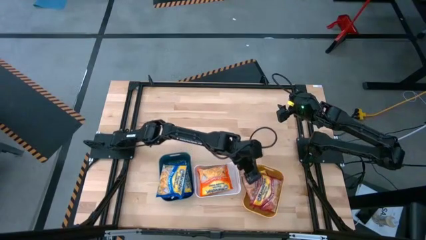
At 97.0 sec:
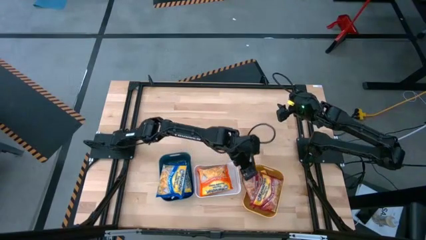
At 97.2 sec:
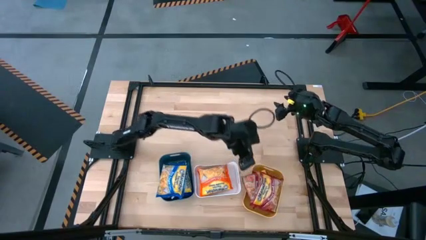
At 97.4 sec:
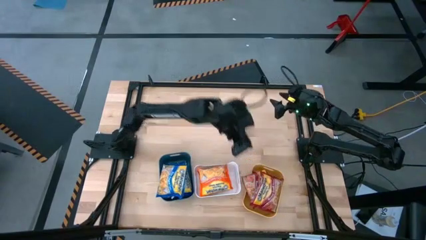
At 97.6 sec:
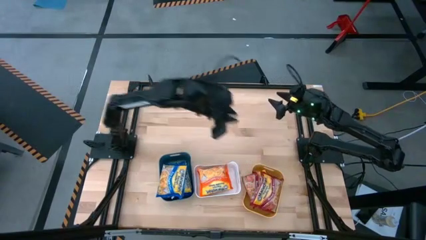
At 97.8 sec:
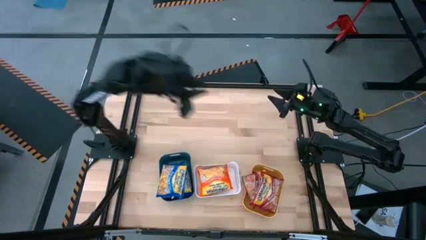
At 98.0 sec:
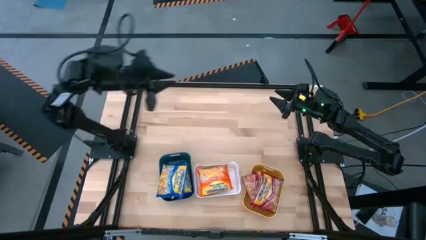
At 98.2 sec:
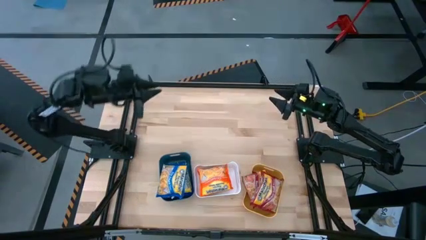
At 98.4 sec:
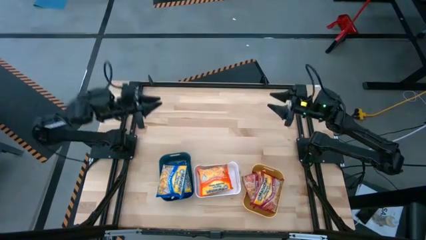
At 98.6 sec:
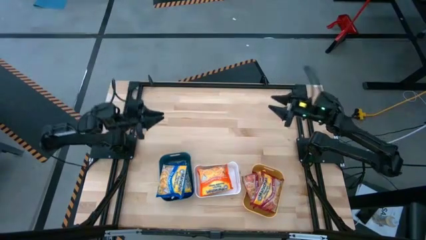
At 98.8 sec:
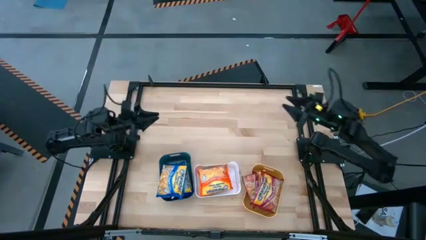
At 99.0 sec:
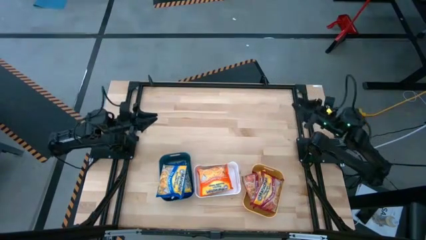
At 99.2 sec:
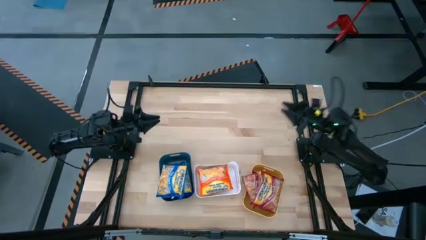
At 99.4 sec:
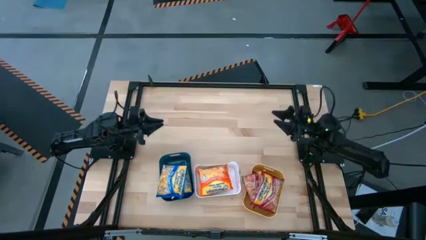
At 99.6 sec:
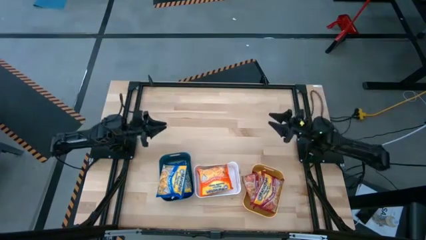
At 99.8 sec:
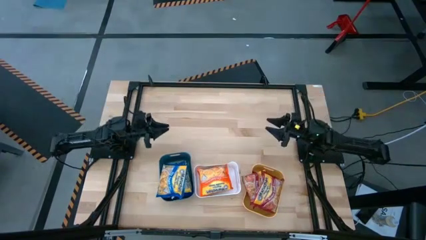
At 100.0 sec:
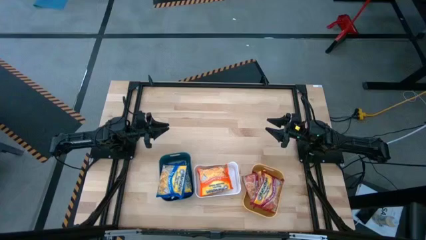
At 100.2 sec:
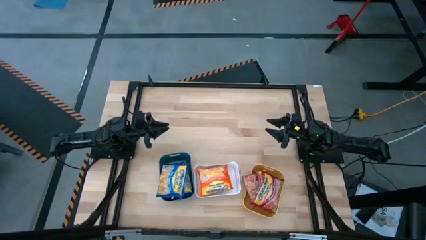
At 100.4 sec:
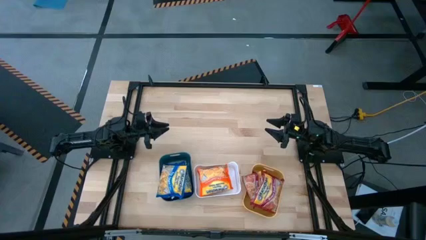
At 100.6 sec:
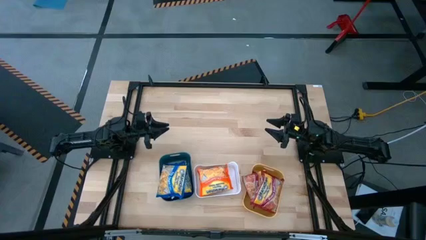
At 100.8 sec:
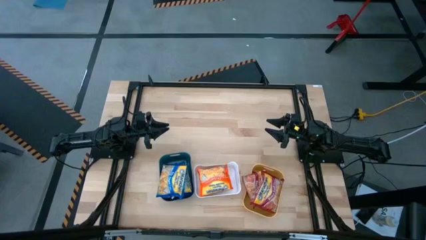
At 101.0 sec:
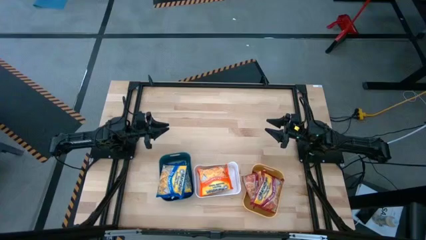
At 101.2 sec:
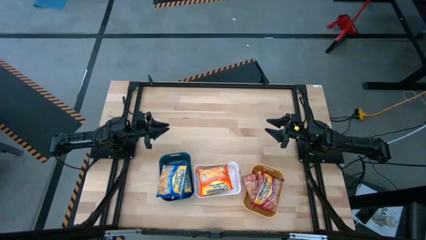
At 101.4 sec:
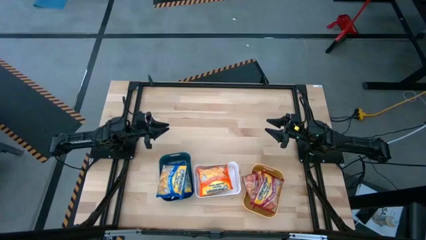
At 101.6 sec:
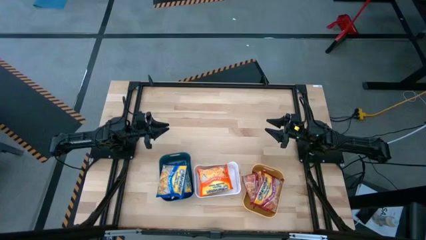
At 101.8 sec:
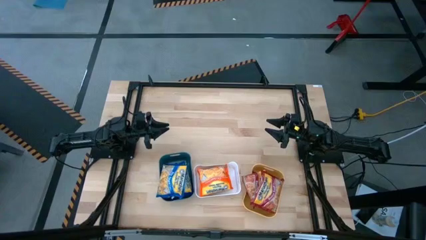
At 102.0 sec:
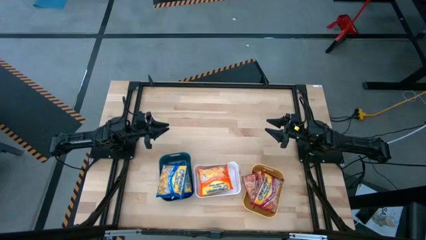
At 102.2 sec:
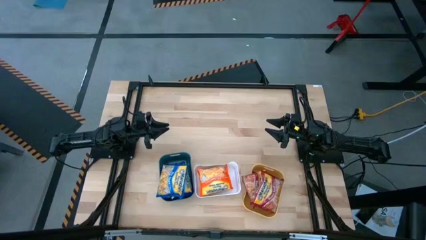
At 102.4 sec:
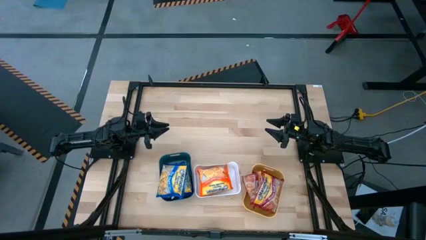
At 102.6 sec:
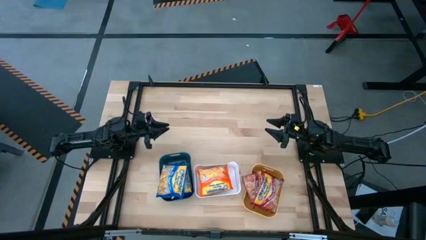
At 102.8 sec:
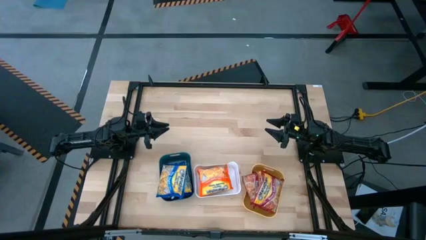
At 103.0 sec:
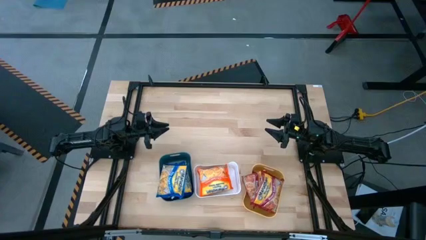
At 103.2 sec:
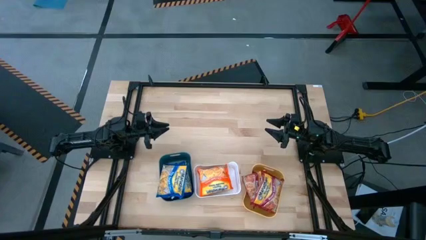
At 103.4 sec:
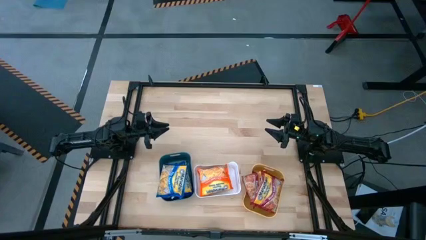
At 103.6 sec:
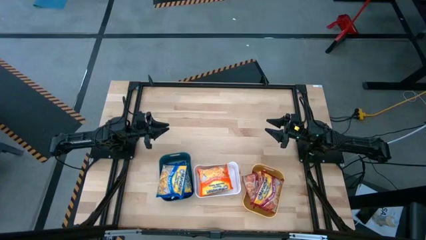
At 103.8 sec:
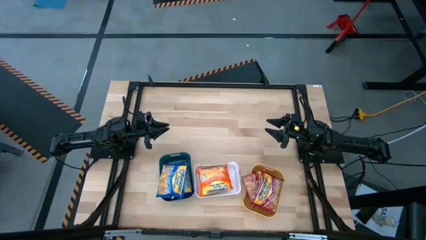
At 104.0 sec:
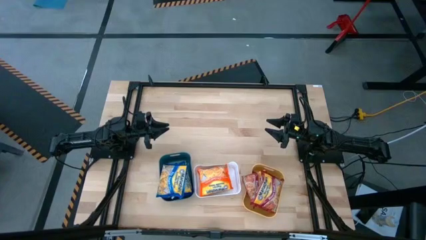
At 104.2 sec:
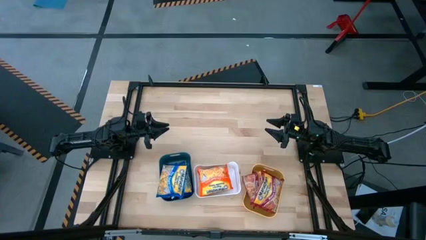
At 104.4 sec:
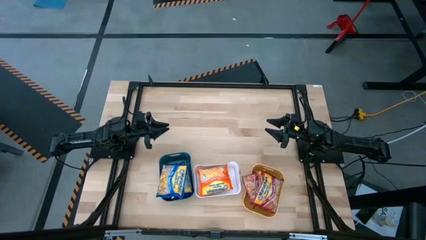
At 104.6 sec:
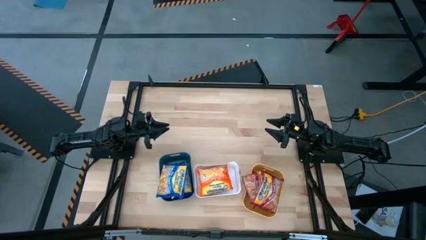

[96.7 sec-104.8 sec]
Task: Sort Maruchan noodles
Return to Home Position

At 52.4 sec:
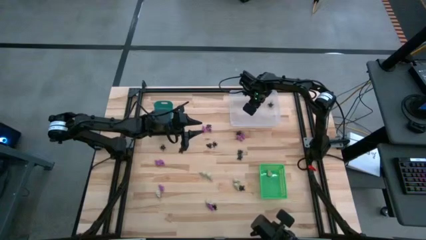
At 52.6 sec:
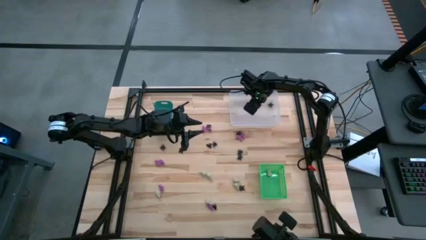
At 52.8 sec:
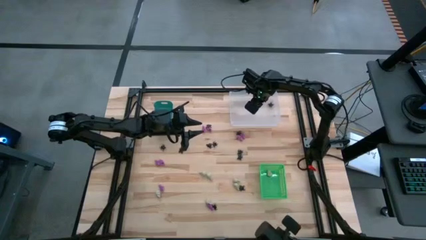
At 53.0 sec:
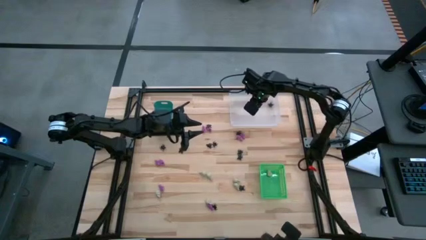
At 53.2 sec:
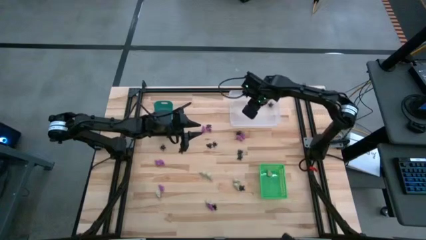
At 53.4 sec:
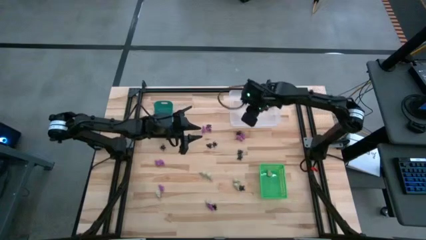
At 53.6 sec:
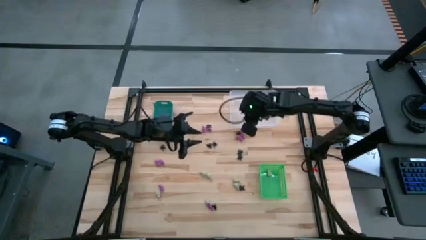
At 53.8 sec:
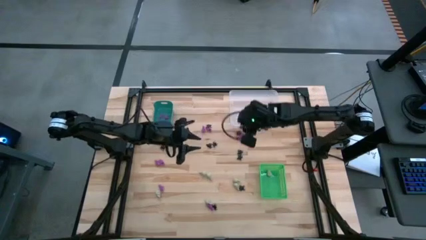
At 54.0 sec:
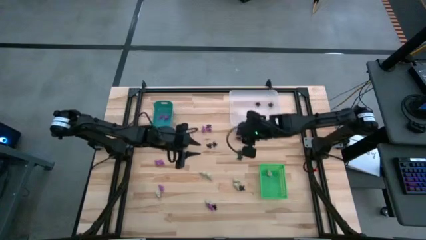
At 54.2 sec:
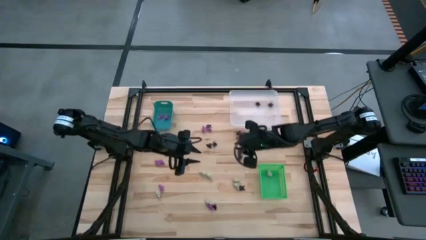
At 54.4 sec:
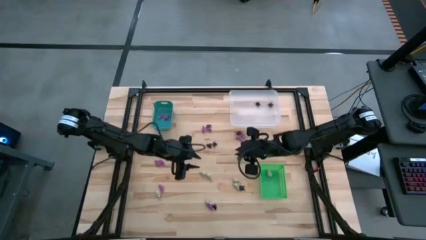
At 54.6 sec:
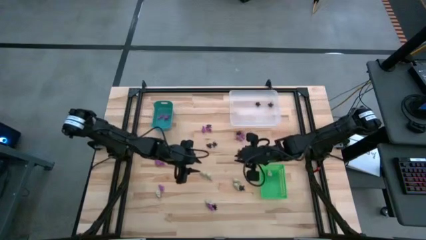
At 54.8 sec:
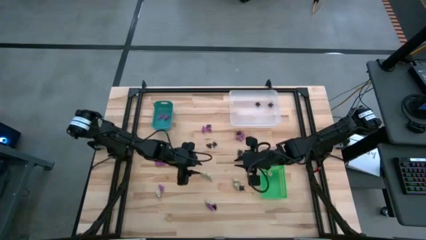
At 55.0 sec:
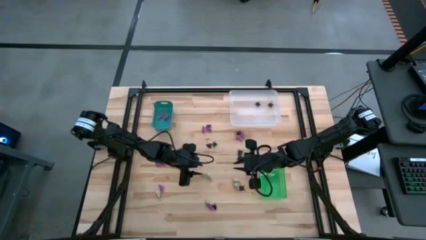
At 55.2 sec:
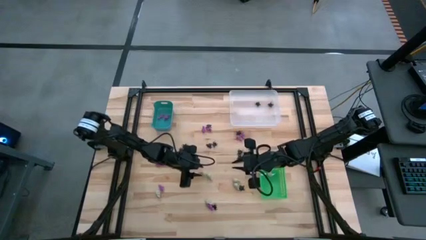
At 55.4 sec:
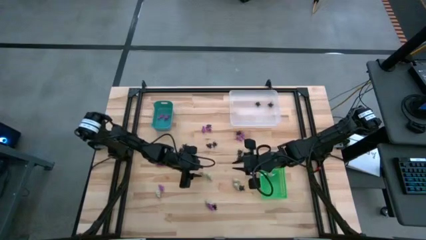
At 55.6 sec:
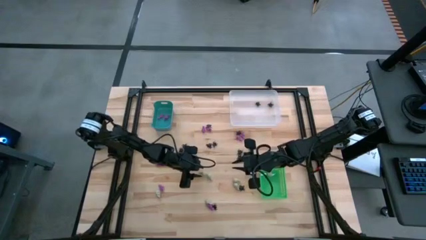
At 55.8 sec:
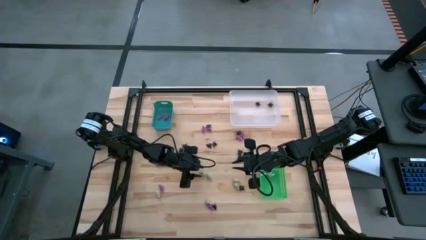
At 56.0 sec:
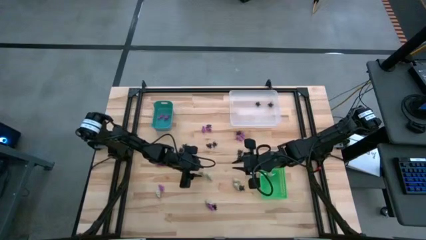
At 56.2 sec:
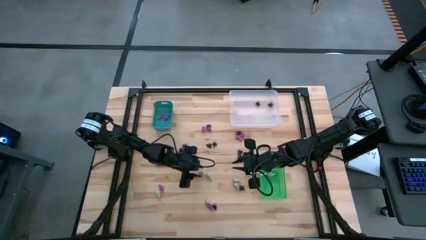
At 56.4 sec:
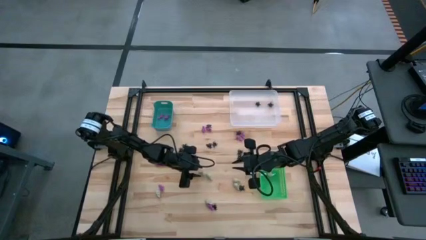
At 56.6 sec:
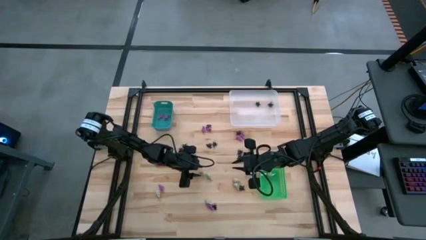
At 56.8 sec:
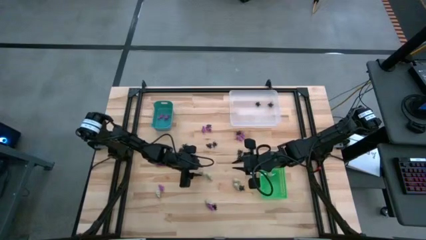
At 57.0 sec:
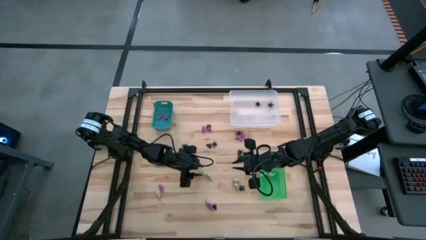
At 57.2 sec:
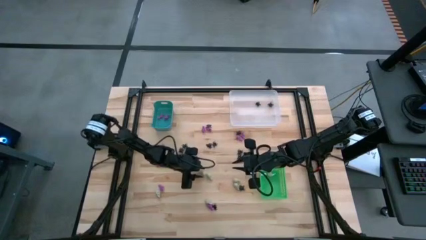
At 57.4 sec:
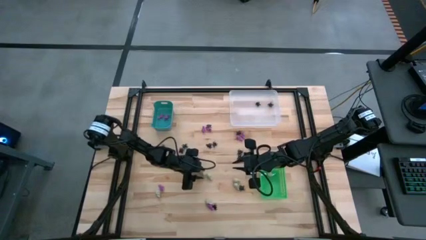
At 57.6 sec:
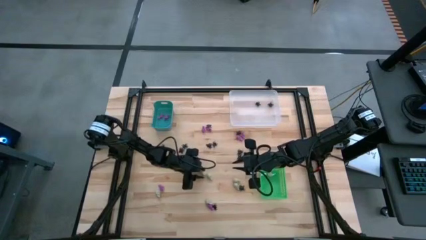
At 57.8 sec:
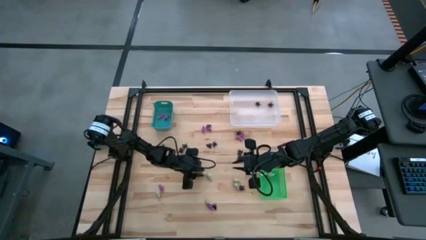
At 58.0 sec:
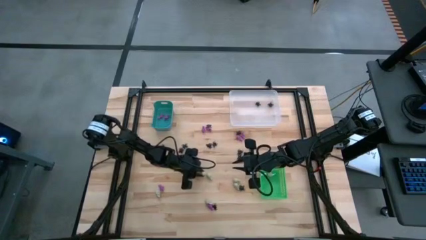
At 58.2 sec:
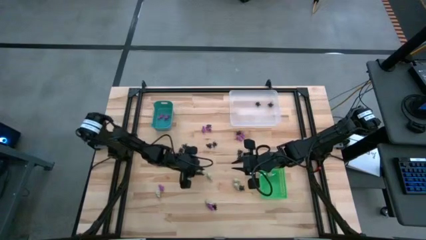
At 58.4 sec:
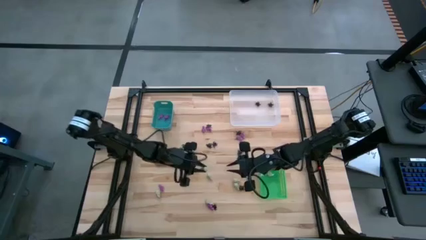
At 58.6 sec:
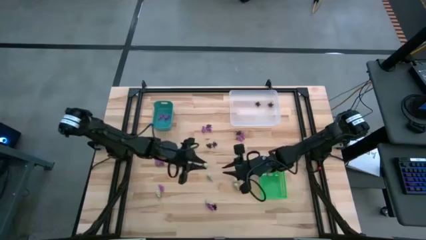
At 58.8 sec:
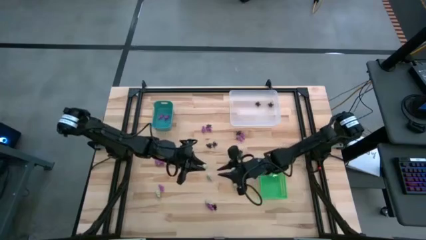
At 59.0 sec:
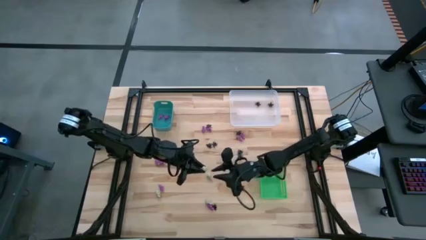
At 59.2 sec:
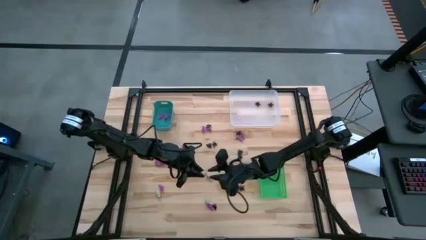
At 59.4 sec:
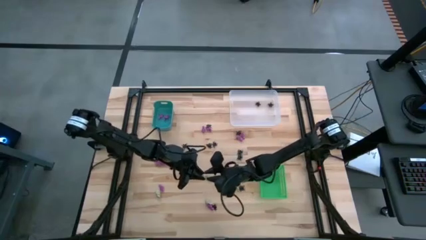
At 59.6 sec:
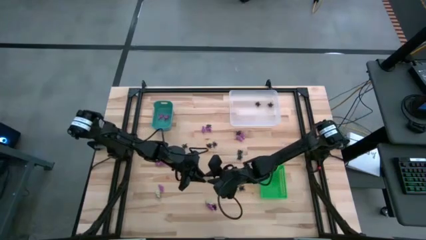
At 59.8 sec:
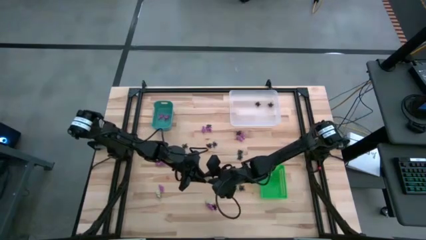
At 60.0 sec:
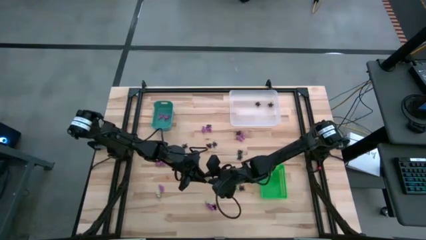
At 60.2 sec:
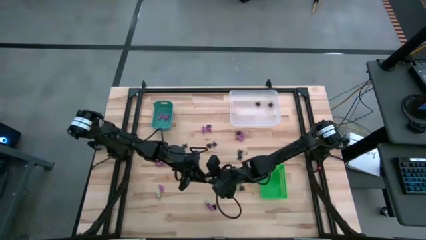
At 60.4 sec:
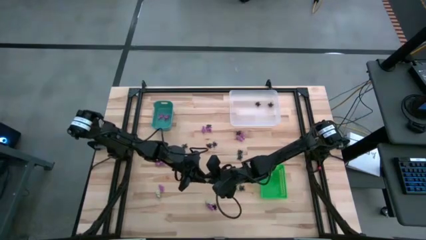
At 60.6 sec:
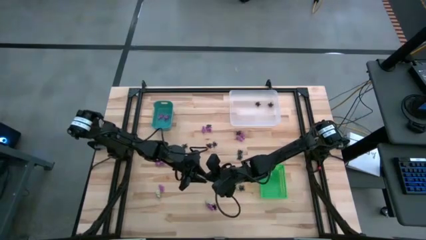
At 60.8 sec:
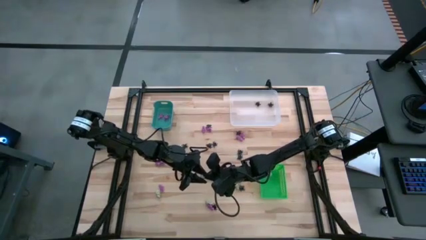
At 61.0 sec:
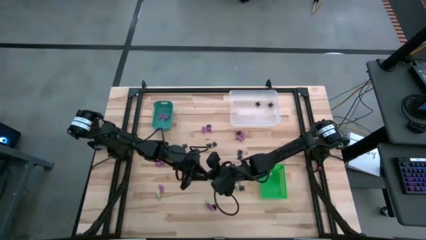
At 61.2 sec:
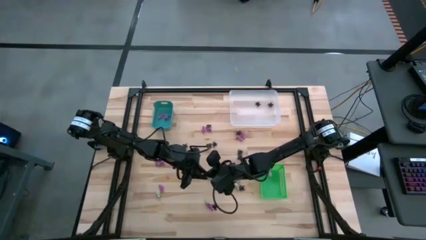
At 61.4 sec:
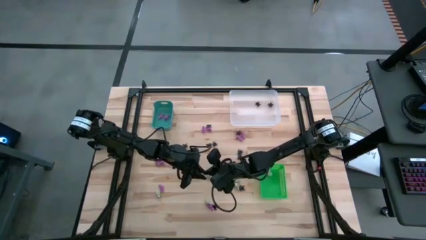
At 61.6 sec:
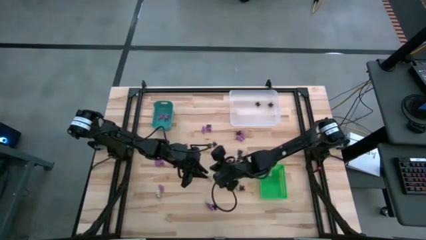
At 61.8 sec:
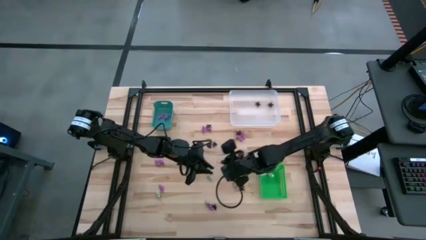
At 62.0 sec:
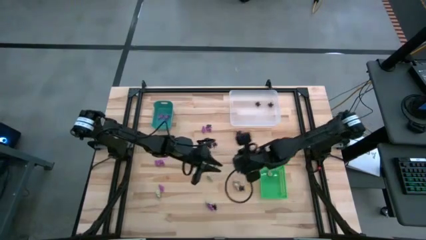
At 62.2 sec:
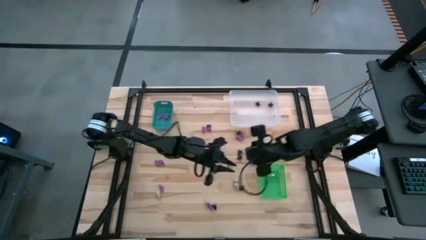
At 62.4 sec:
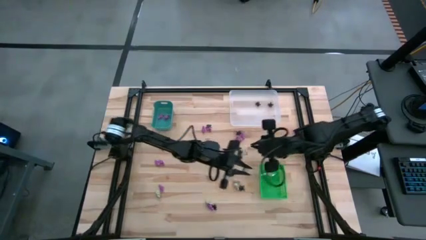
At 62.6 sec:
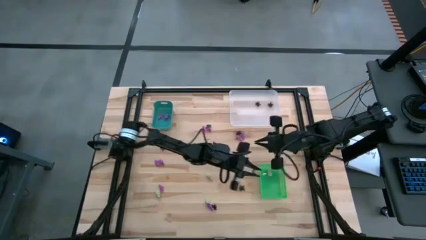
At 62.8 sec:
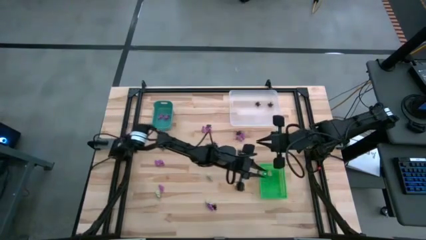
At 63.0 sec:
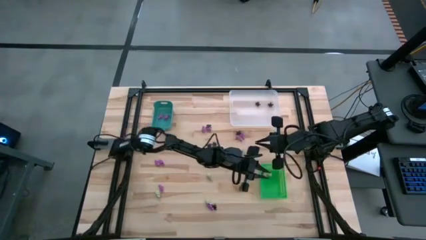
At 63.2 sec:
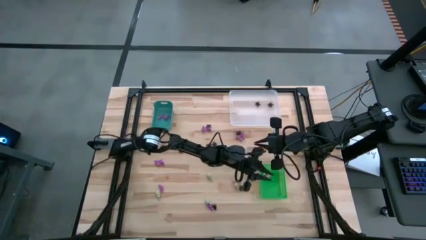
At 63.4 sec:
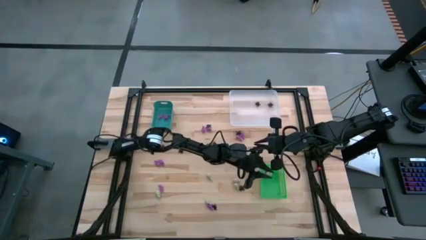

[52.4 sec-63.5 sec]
Task: Sort Halloween decoration
Put the white skull toy into the green bin
